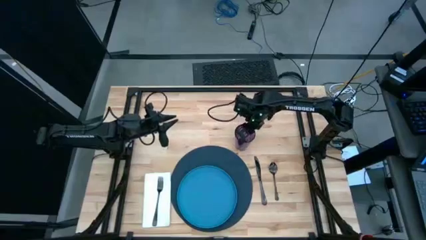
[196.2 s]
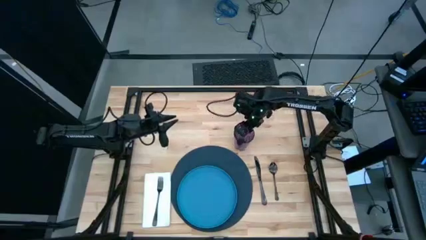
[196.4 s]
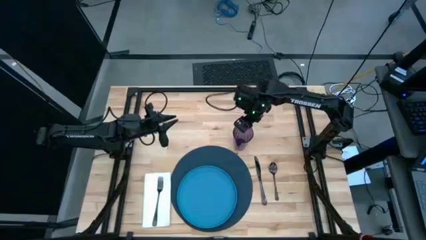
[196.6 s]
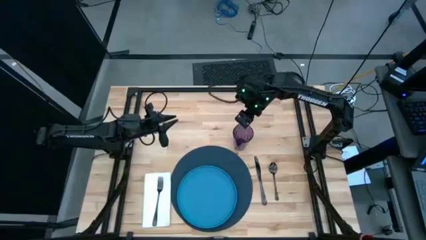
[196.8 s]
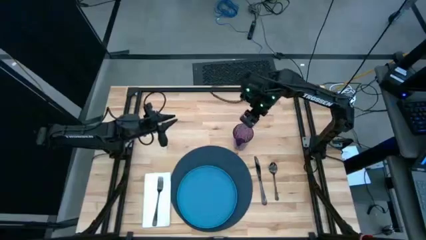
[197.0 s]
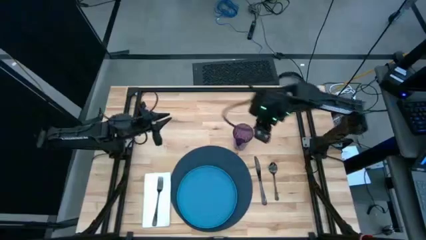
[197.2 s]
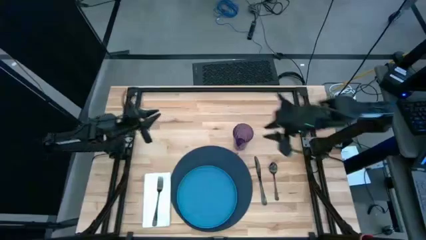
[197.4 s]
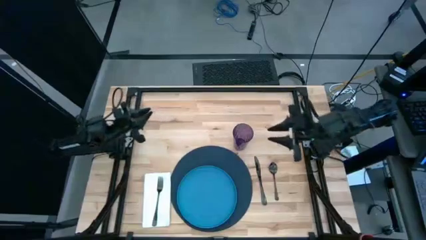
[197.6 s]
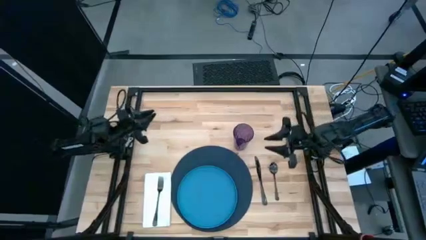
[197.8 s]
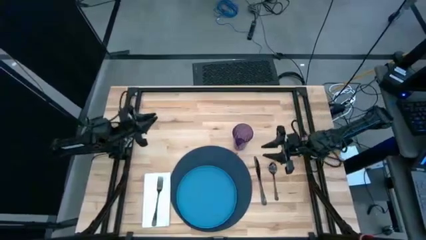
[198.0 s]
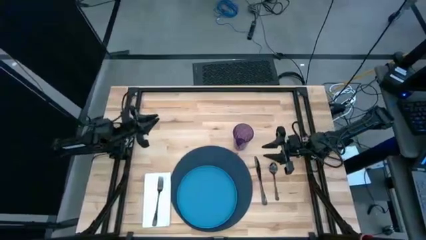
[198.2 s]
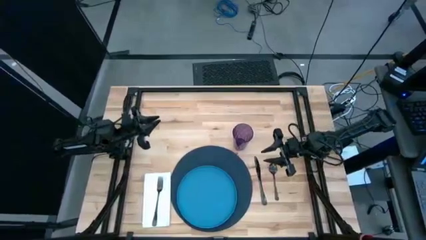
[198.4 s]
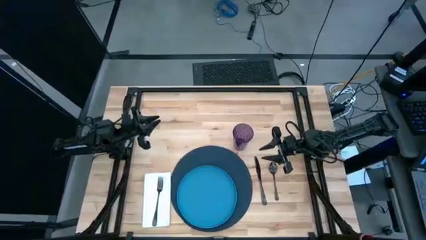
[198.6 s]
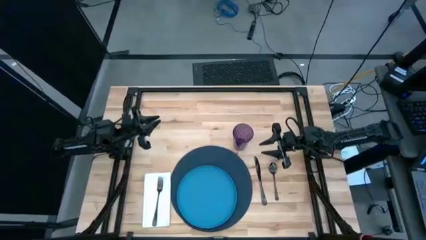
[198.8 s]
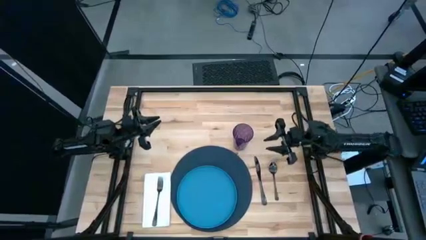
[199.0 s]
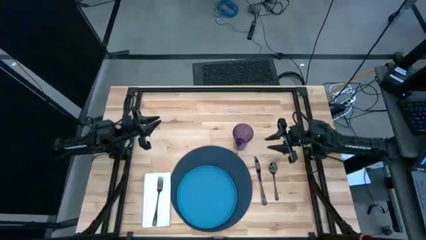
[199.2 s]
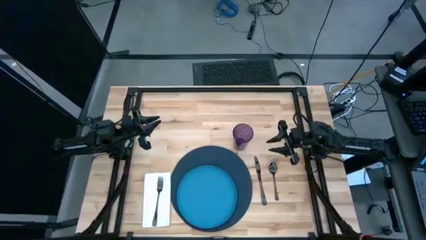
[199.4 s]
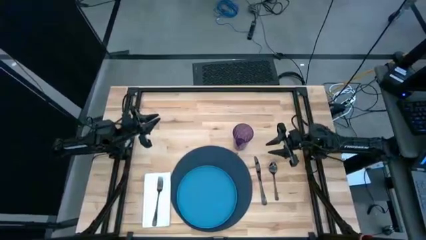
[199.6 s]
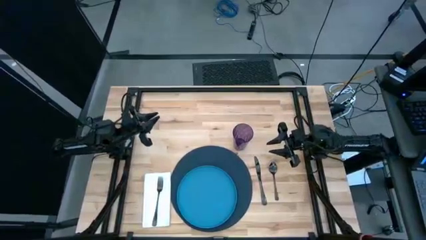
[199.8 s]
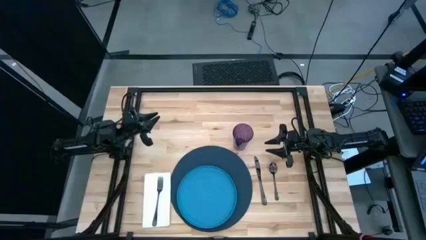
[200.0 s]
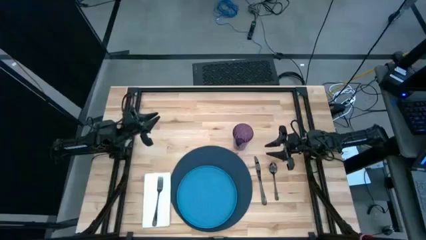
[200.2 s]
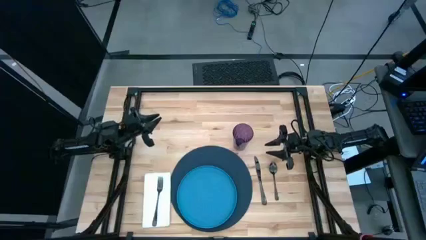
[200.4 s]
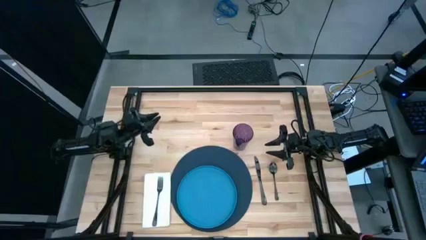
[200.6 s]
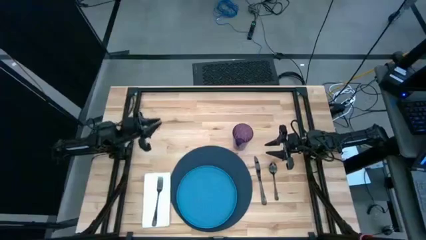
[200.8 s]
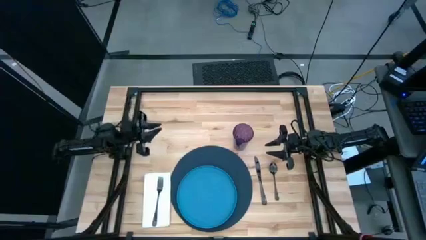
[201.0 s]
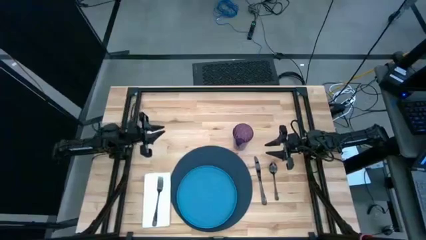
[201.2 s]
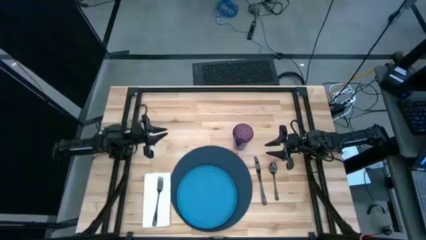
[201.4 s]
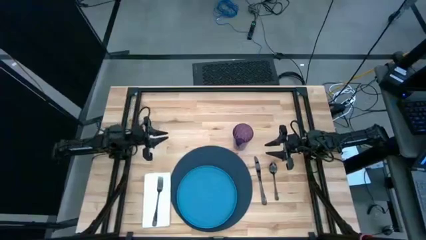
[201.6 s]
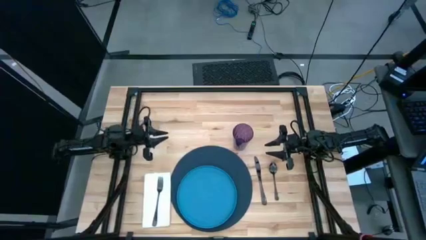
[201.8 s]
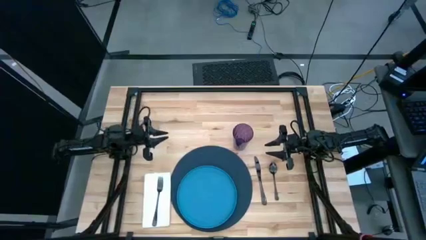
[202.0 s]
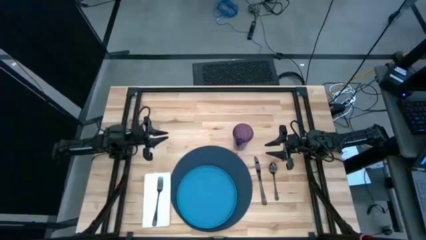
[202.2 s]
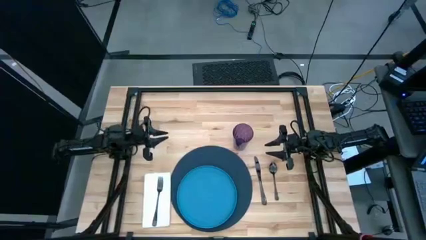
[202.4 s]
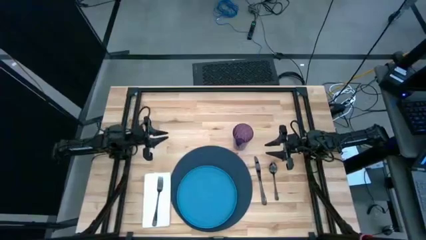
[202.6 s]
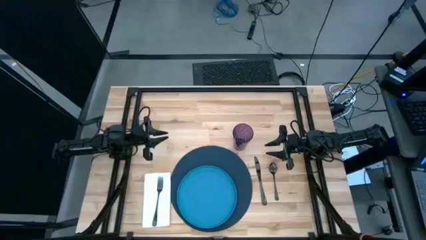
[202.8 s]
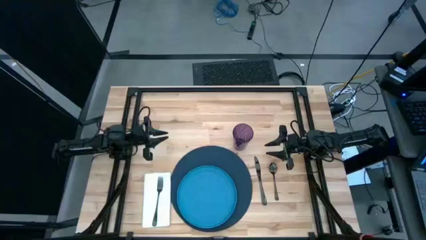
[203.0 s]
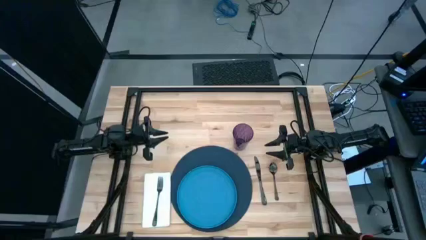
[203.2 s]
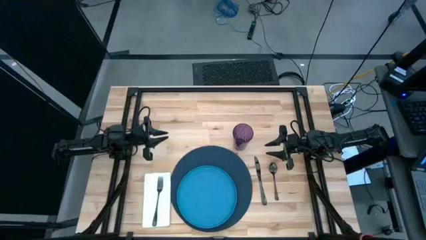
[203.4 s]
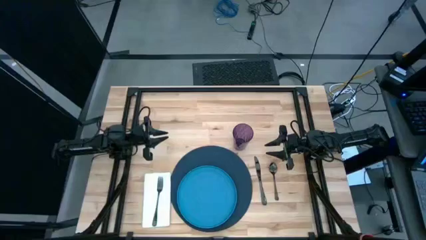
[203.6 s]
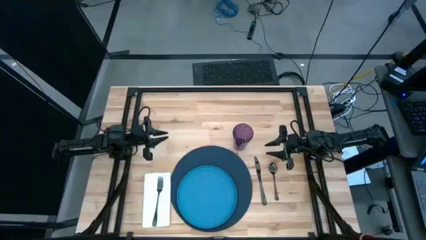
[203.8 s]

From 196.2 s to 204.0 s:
Task: Set table place
Return to Home Position

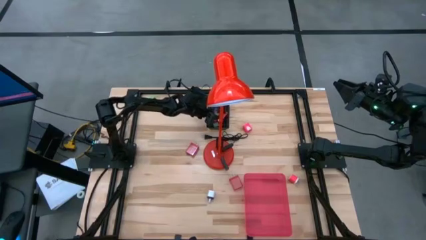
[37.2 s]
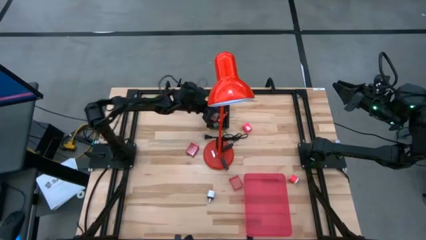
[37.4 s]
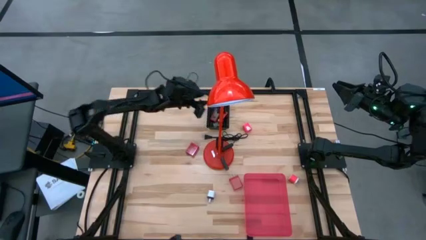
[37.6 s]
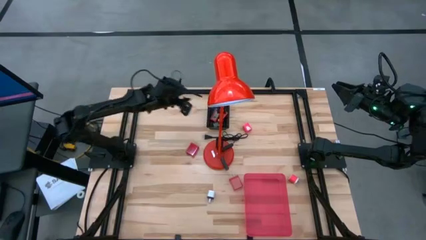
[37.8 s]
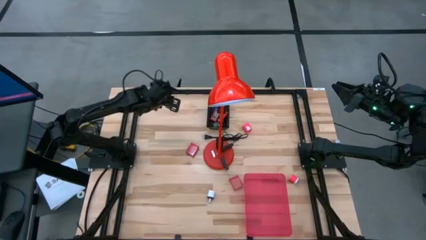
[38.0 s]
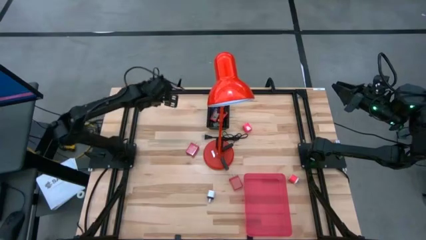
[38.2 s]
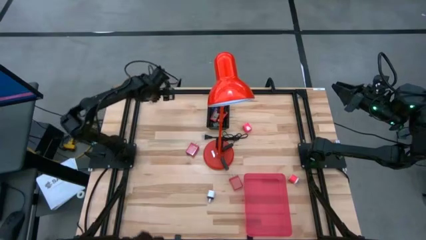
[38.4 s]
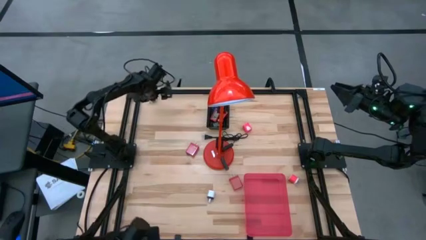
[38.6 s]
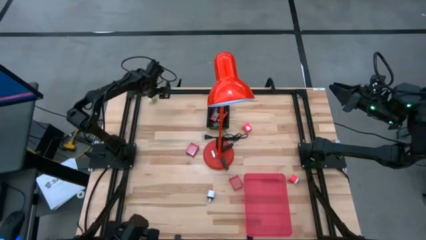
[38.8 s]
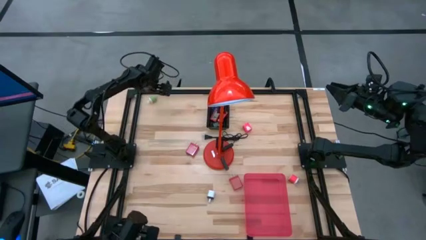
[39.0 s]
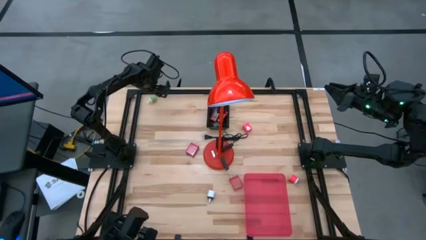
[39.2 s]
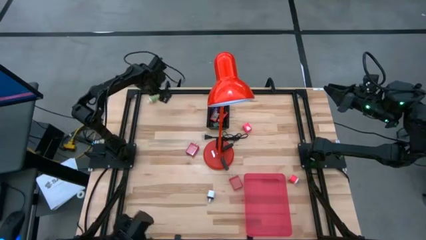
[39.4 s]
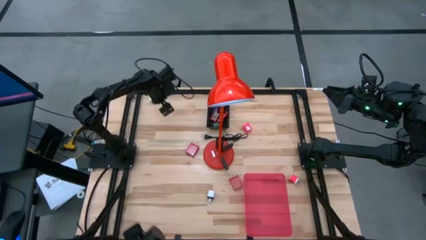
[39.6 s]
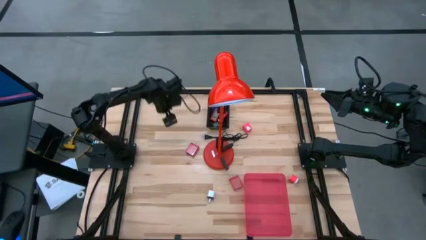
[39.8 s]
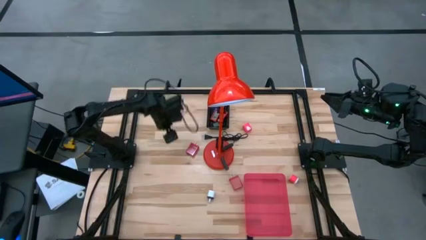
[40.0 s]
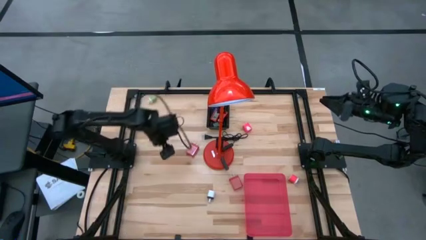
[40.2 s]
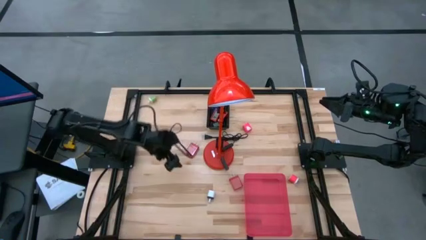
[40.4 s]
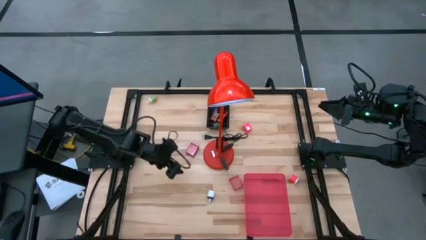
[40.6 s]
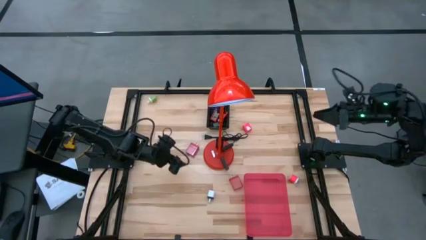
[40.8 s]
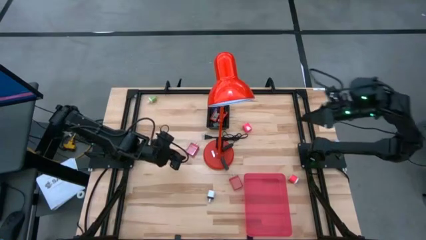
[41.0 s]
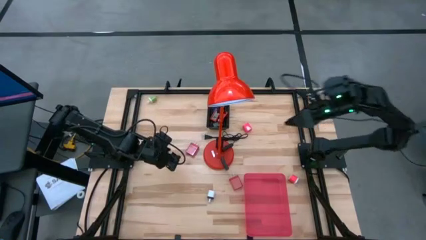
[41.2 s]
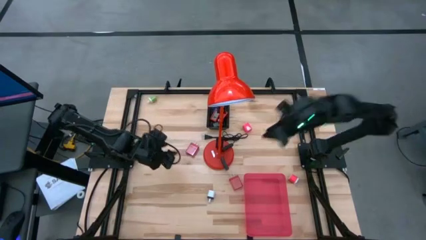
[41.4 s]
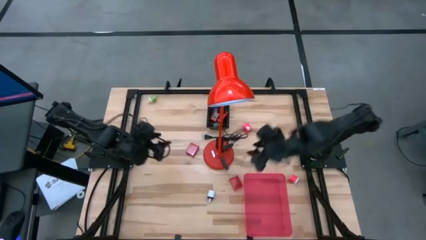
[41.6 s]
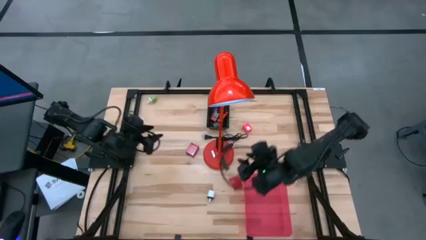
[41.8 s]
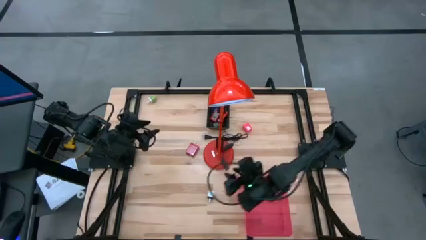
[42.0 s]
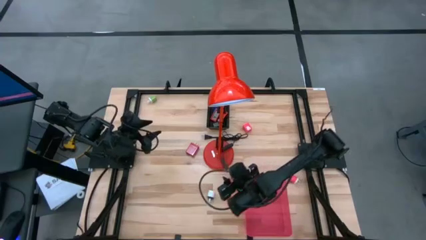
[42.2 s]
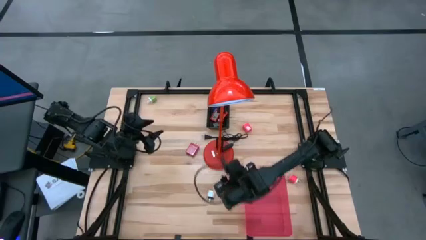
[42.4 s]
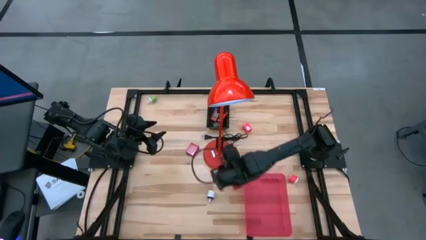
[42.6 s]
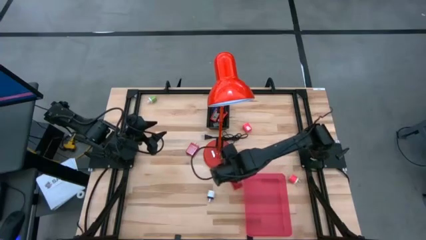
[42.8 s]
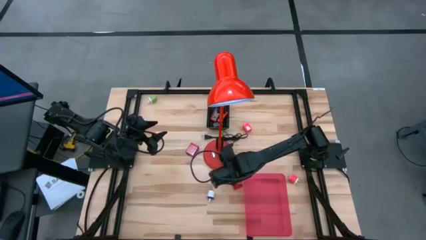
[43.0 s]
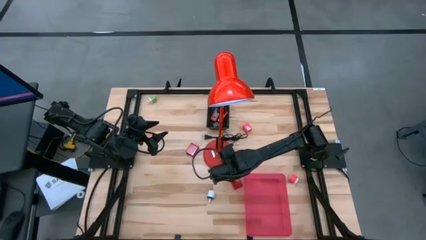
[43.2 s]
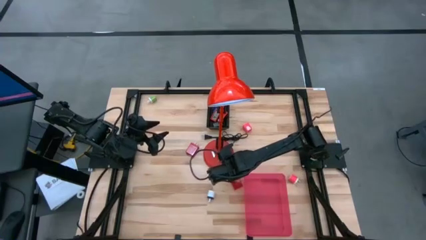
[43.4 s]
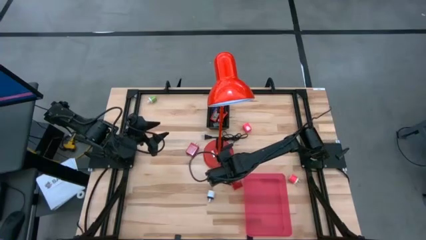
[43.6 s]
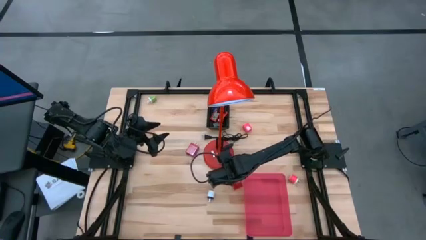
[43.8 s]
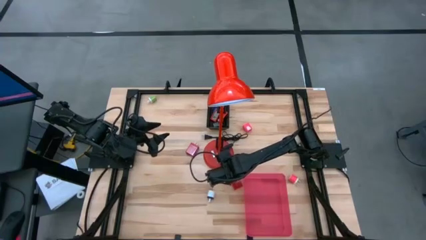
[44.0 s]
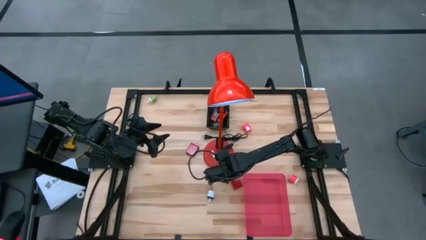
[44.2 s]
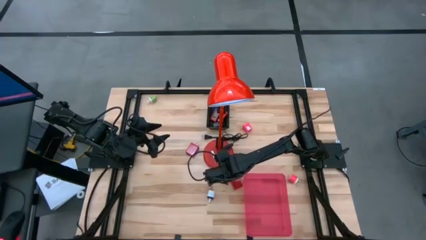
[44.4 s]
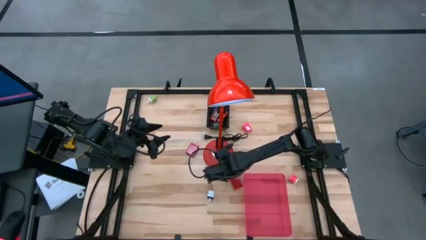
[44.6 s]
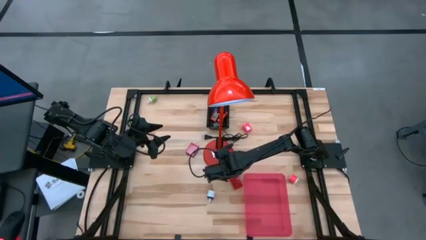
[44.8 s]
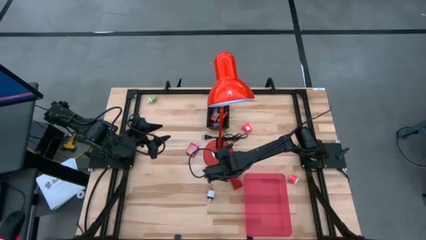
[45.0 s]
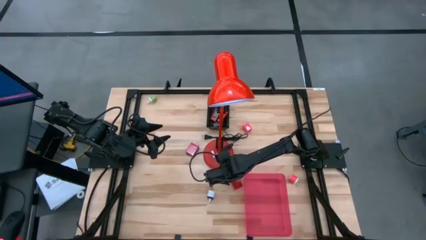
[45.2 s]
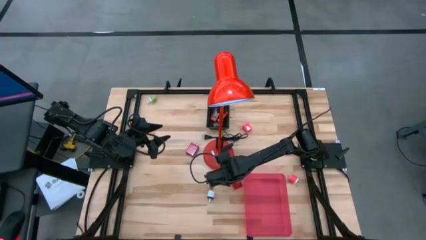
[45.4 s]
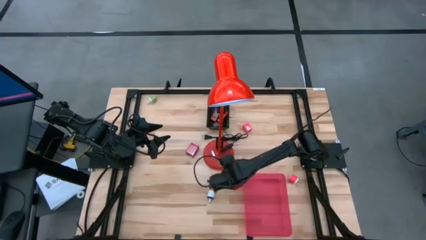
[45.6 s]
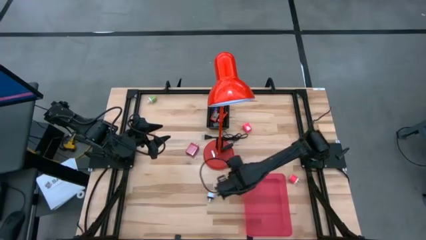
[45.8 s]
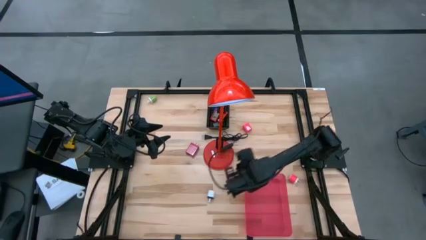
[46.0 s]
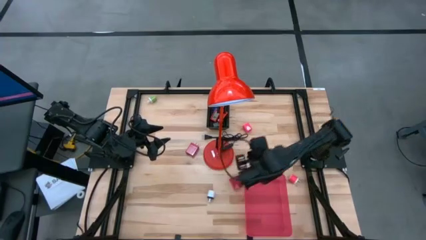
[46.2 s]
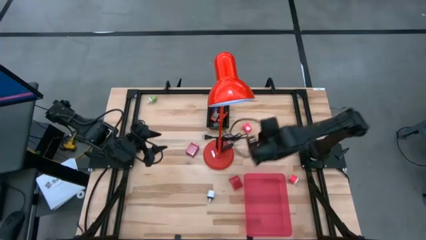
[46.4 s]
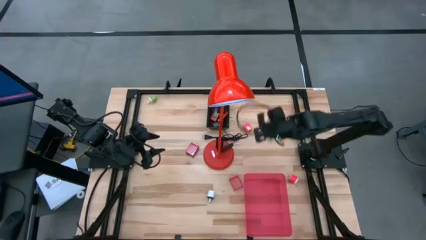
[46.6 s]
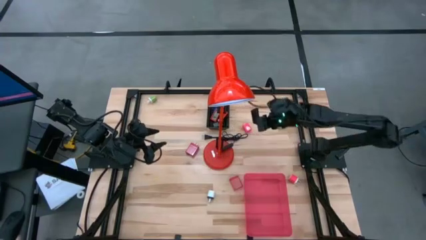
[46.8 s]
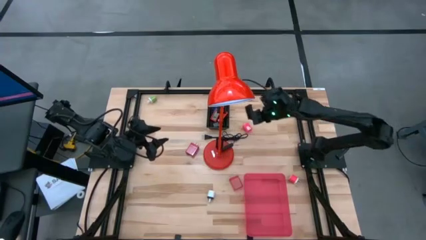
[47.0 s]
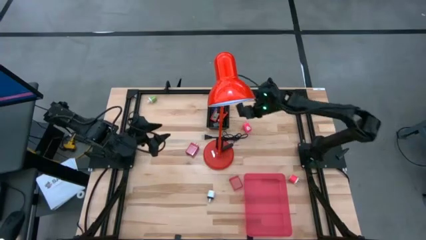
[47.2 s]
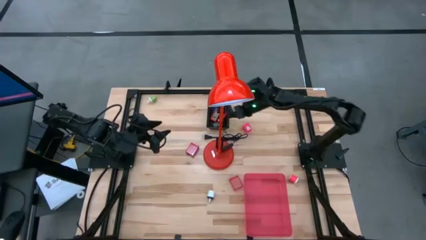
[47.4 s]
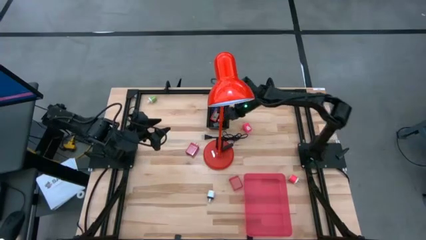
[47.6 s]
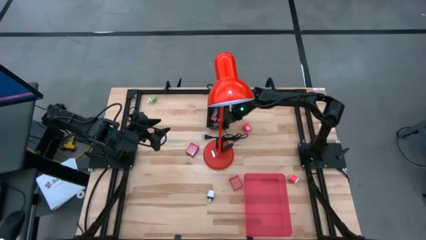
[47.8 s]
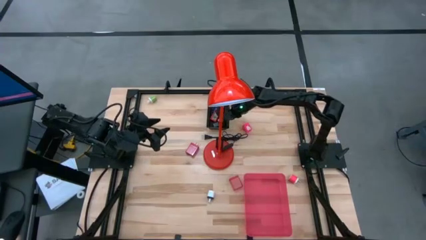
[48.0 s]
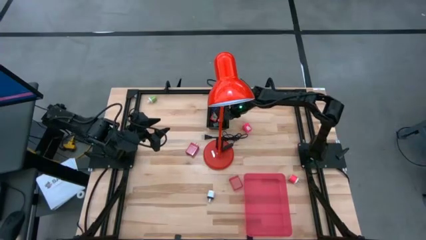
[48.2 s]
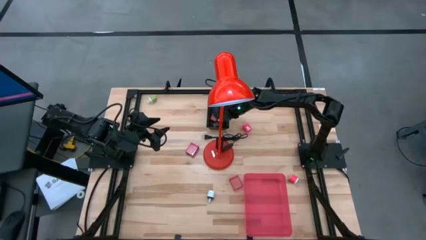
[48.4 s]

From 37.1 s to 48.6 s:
Task: Pick & Place Office items
Put the black digital timer into the black bin
